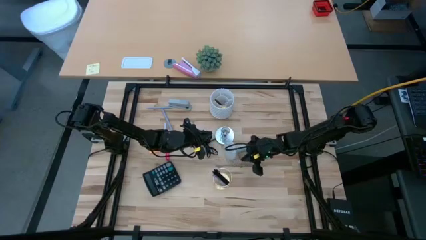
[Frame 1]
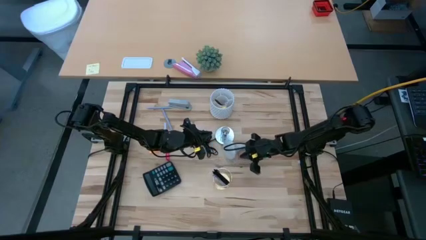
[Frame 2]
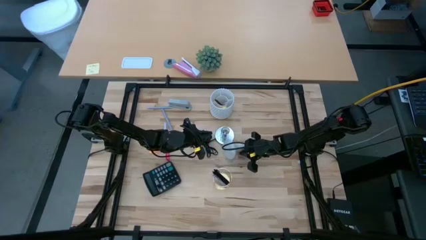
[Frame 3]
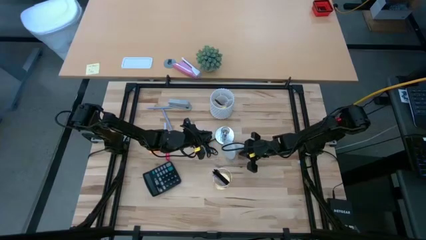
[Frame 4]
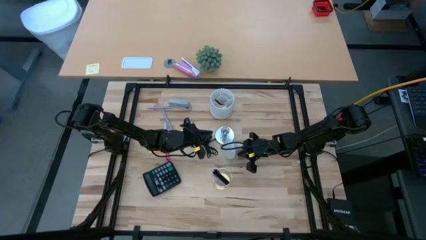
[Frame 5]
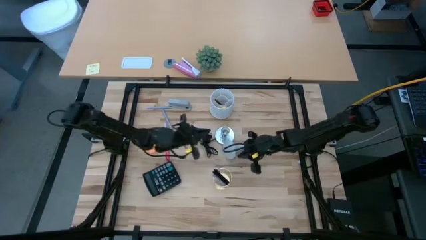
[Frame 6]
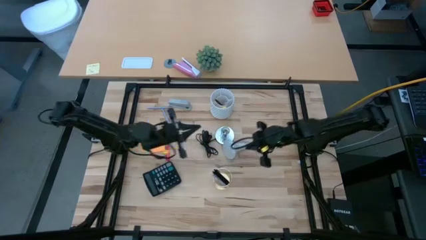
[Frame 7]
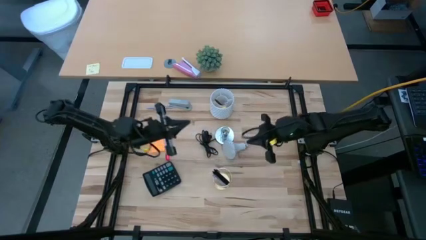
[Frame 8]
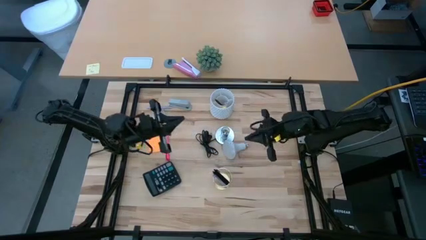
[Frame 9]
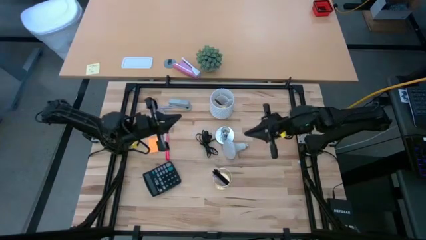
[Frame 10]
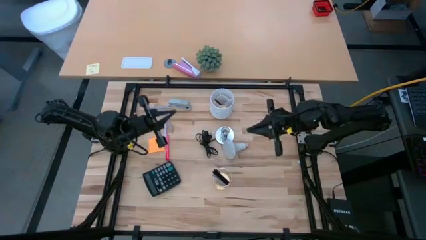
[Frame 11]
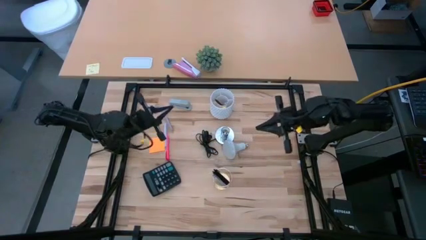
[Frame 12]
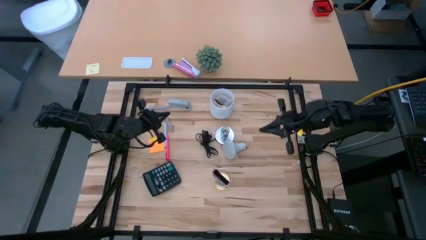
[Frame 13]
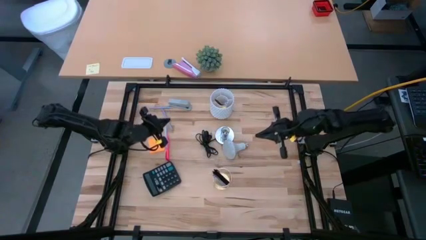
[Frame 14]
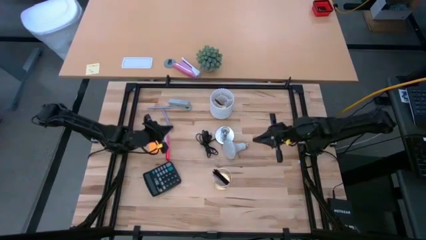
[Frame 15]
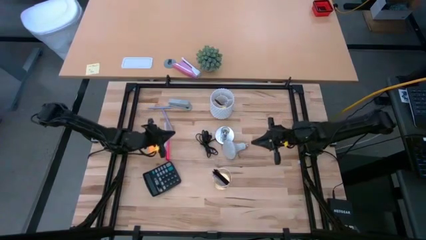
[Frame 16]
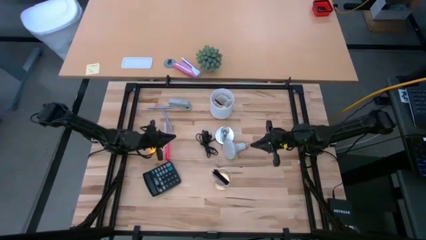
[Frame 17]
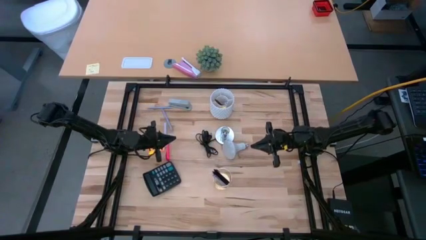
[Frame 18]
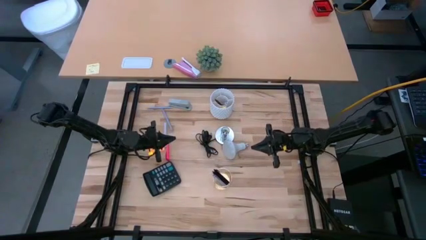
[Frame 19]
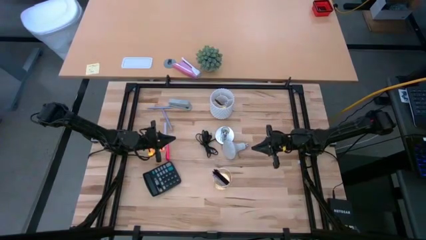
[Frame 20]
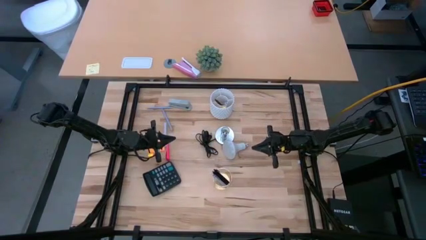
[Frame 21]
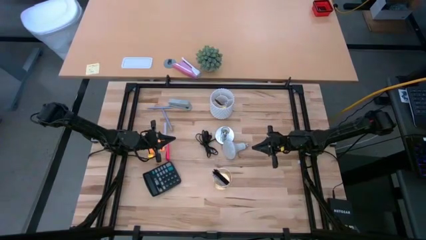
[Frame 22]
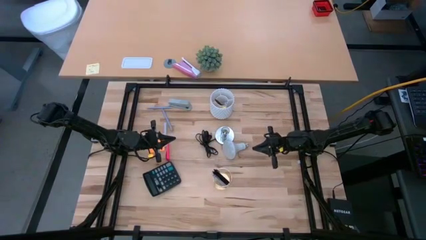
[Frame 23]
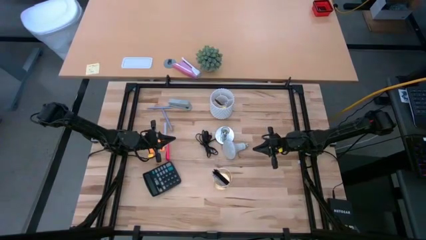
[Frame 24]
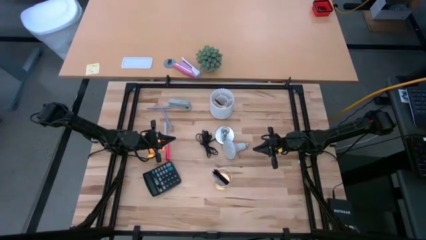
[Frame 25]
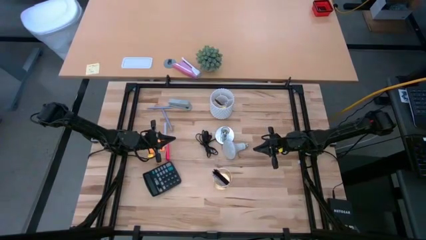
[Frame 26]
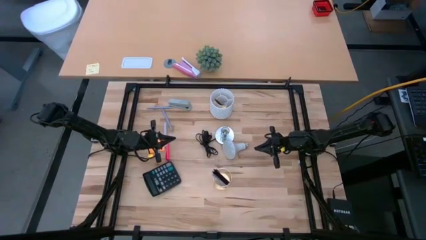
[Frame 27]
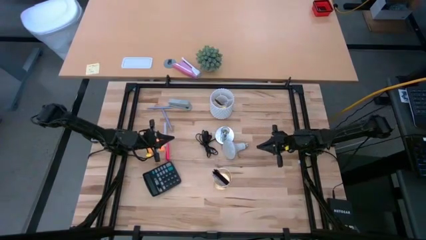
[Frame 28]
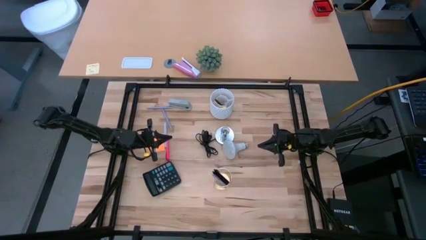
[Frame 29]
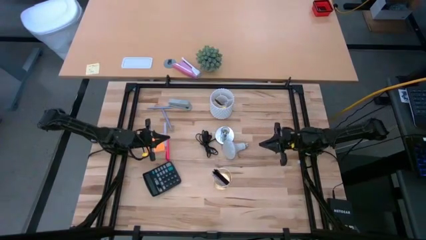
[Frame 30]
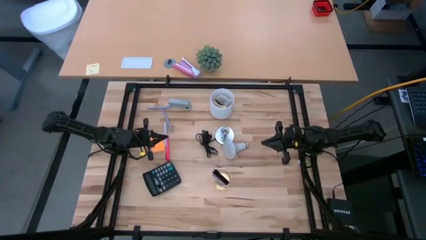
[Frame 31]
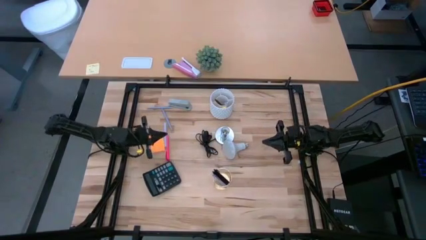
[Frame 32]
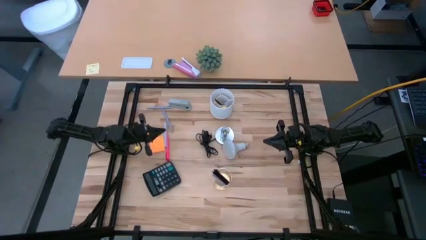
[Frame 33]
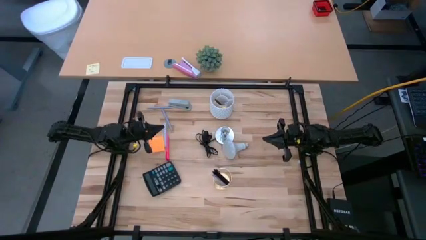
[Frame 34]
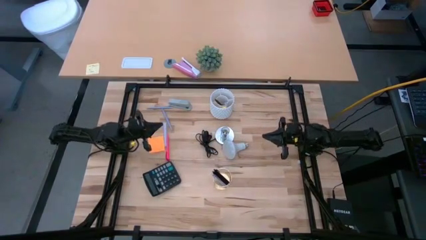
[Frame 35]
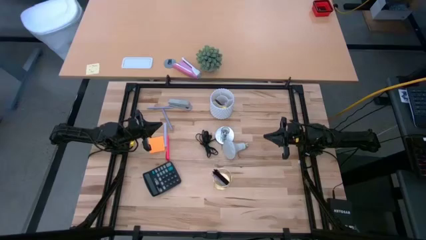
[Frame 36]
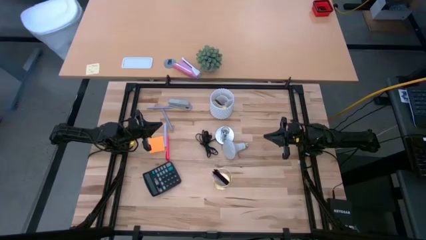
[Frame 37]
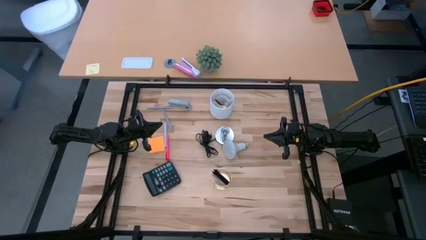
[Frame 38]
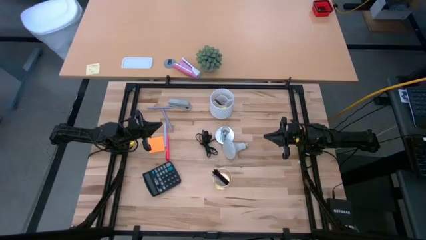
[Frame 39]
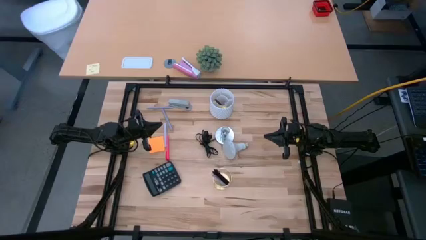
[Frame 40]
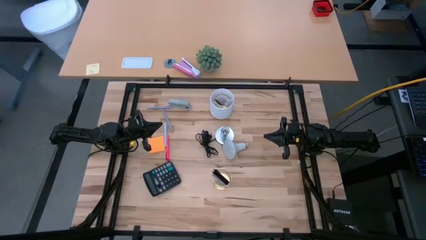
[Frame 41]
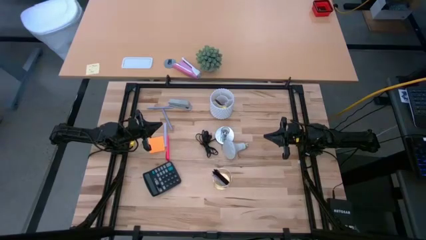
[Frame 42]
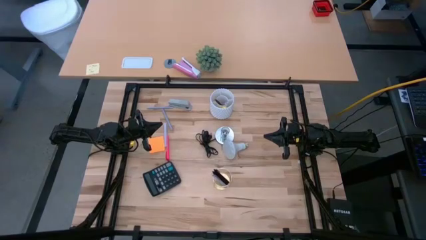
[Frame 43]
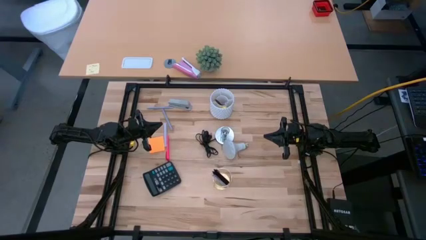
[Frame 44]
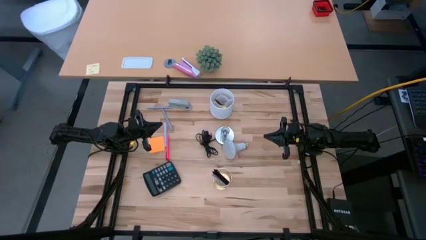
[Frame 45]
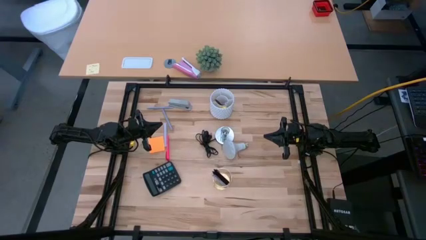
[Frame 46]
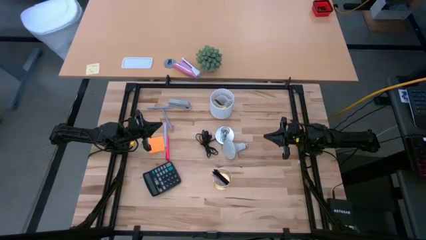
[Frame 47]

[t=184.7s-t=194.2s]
Task: Screw lightbulb
Return to Home Position
